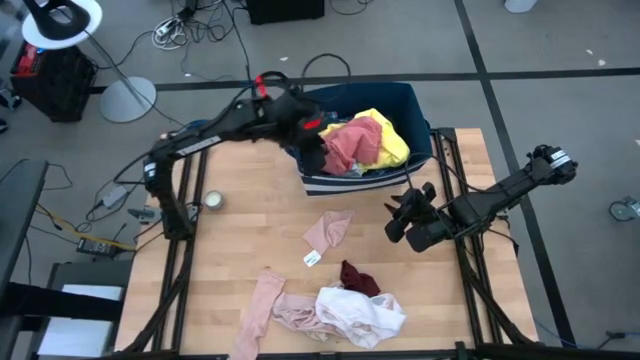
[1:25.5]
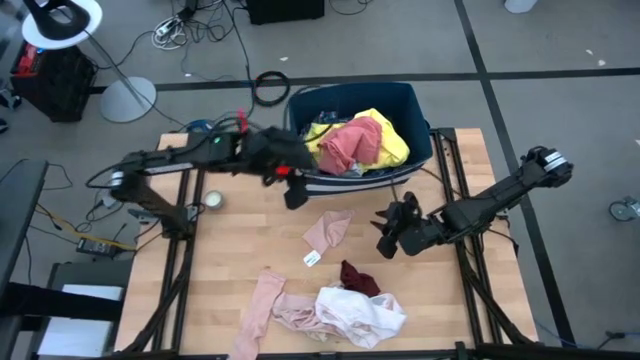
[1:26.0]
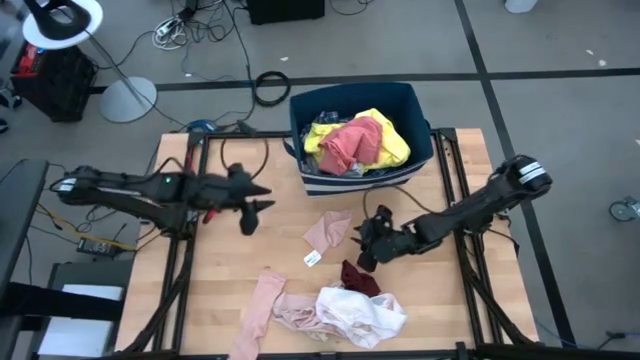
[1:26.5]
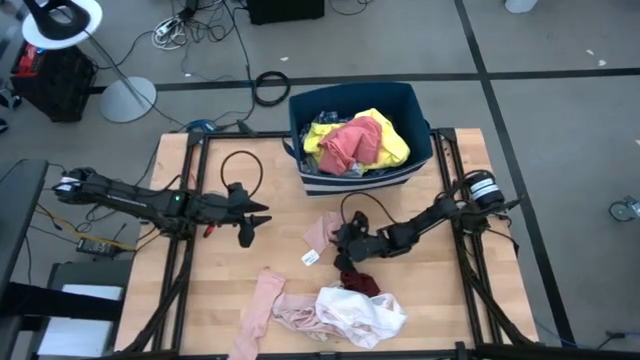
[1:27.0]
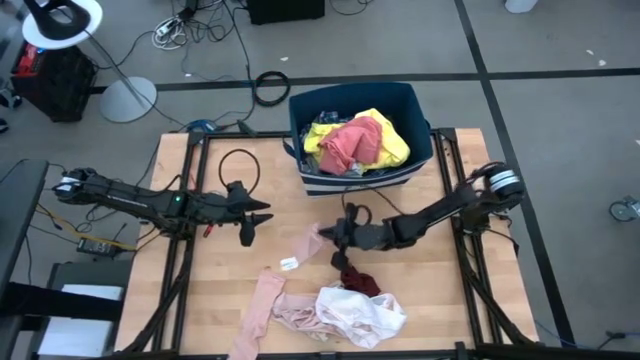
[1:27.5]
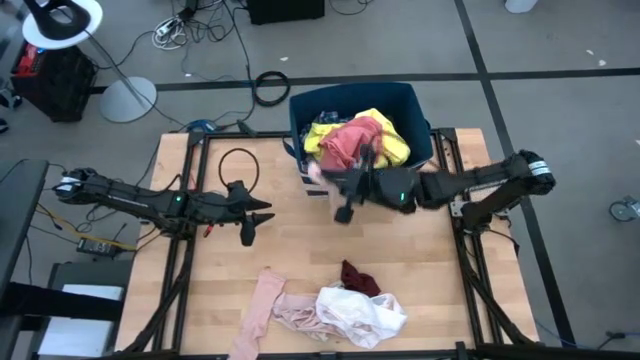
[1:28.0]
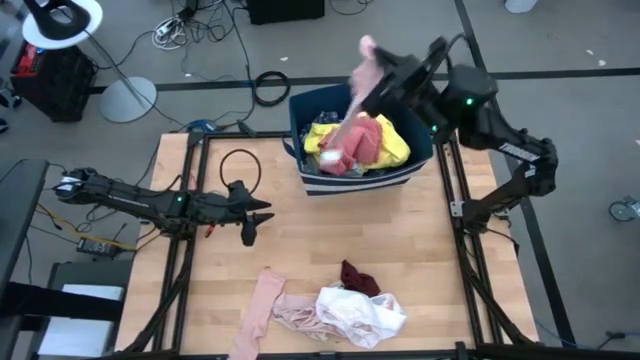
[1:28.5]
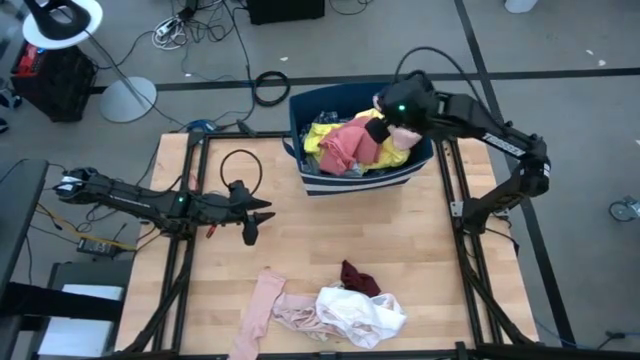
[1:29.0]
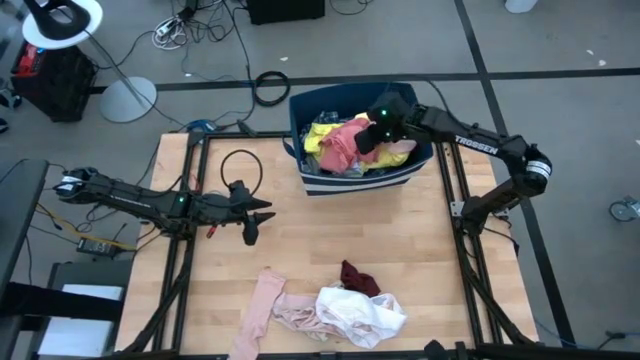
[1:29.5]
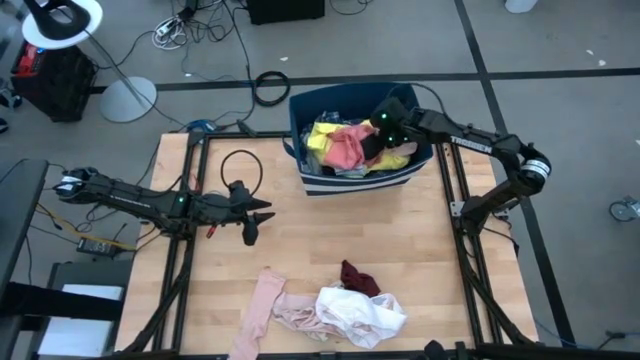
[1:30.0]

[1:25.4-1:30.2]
Task: Sort clothes
Put the top light pink sock into the blue laundry bin

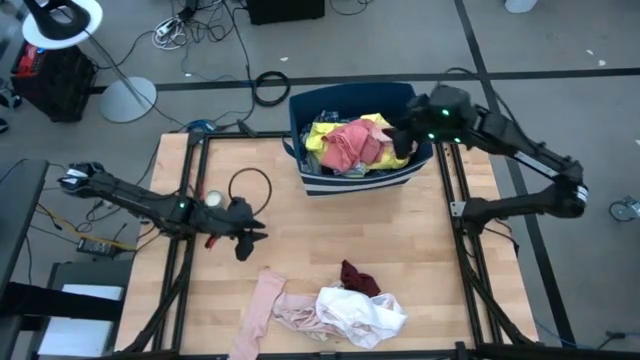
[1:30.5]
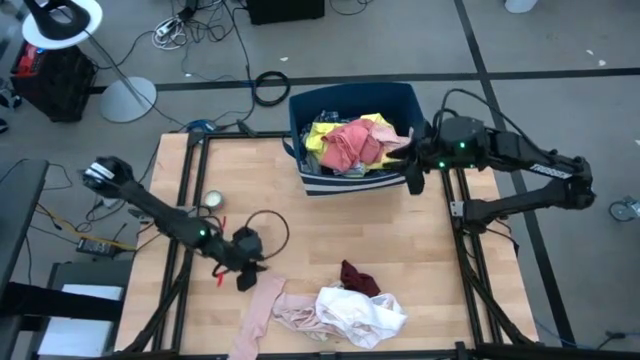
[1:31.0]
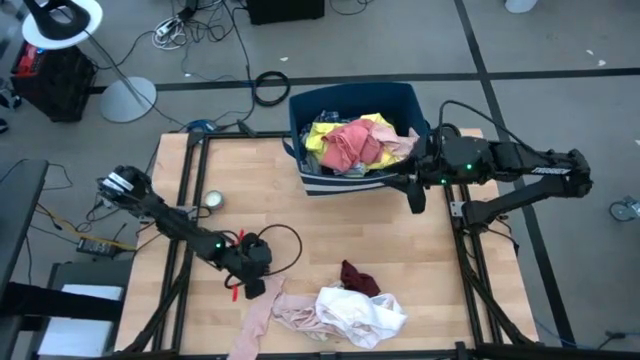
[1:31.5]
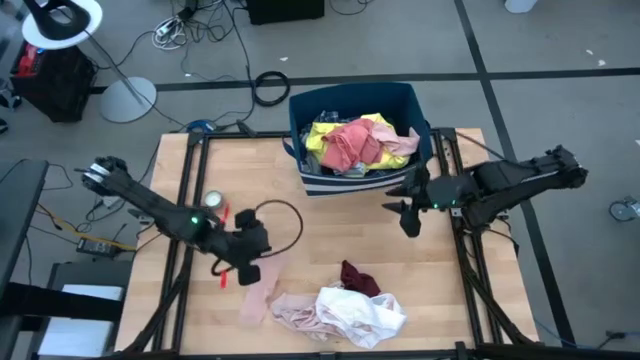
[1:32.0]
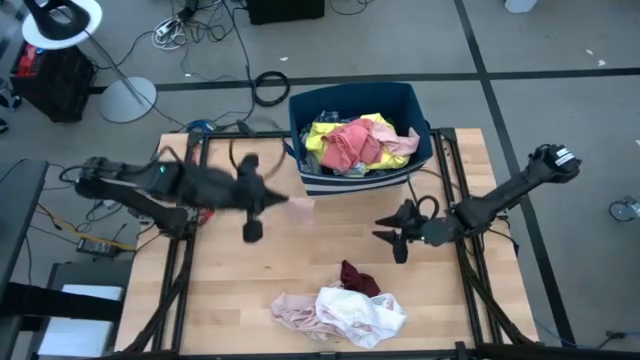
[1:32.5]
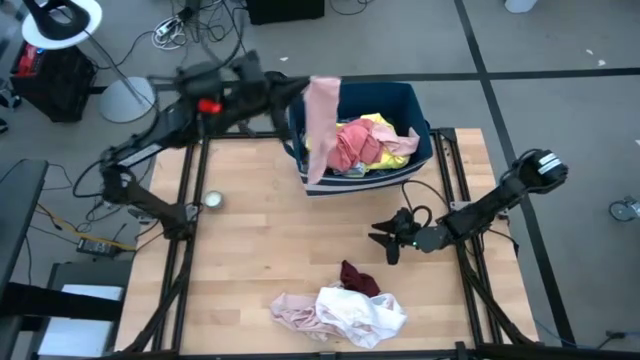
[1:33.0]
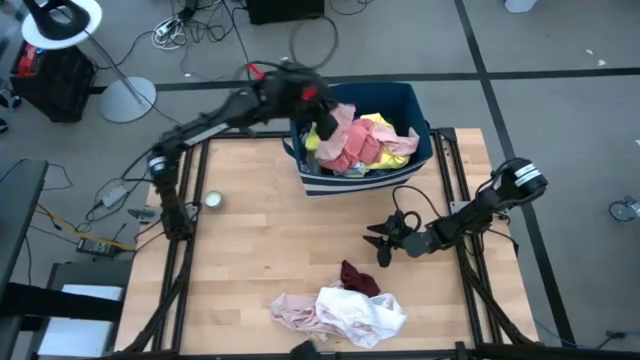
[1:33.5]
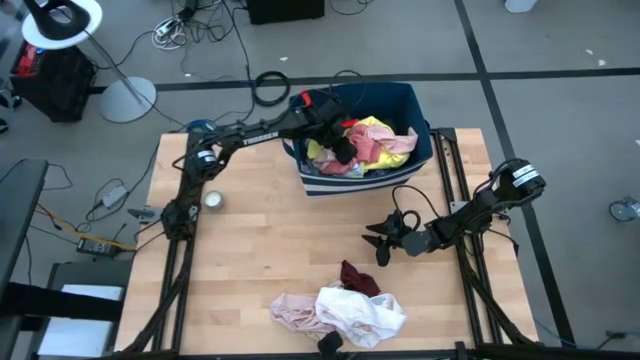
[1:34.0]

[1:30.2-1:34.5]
Put the light pink sock into the blue laundry bin

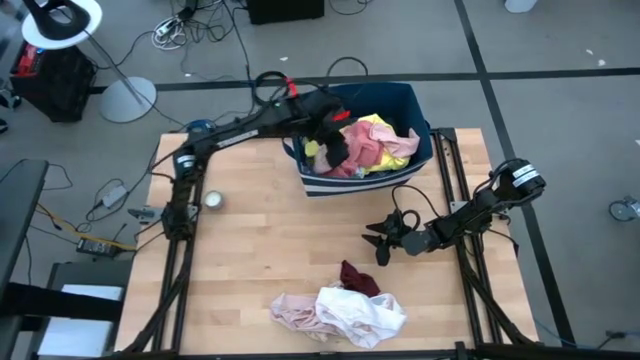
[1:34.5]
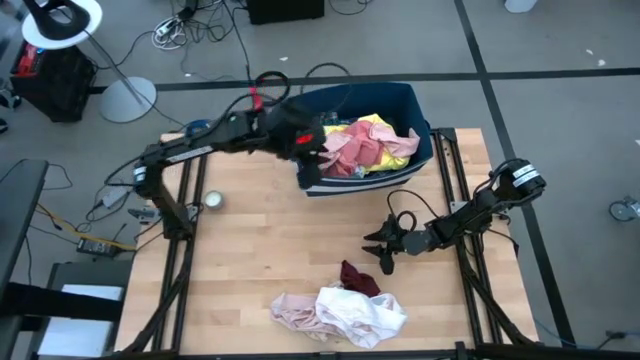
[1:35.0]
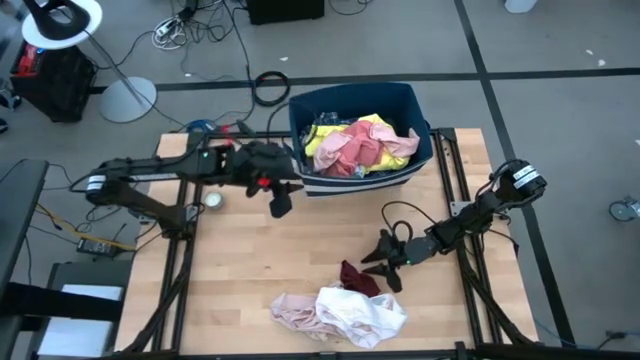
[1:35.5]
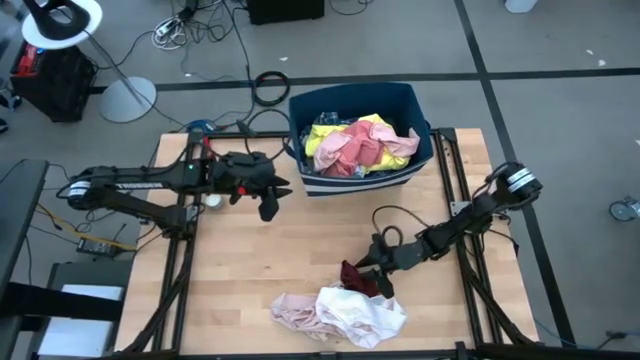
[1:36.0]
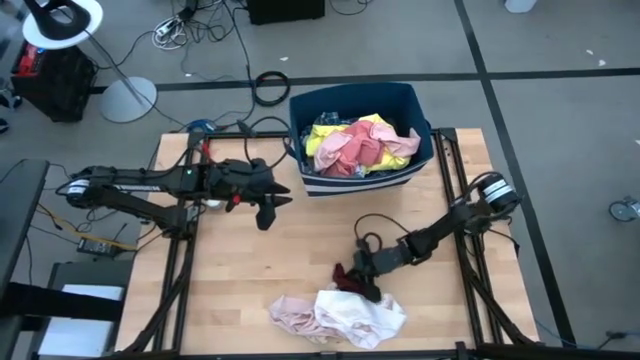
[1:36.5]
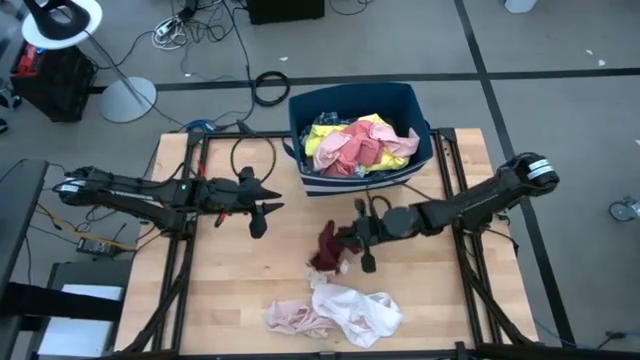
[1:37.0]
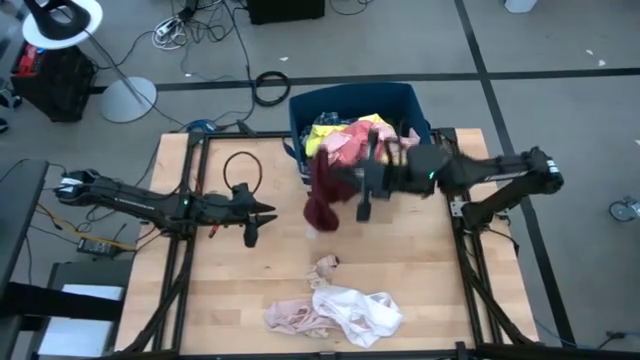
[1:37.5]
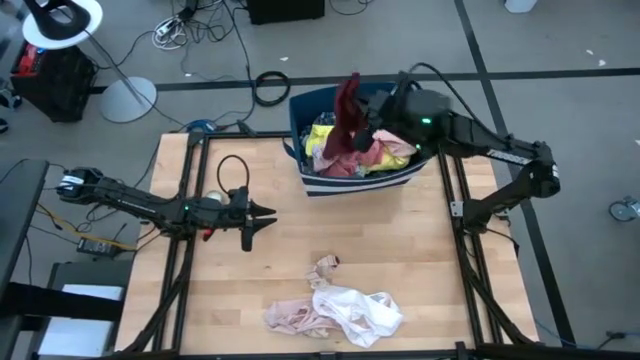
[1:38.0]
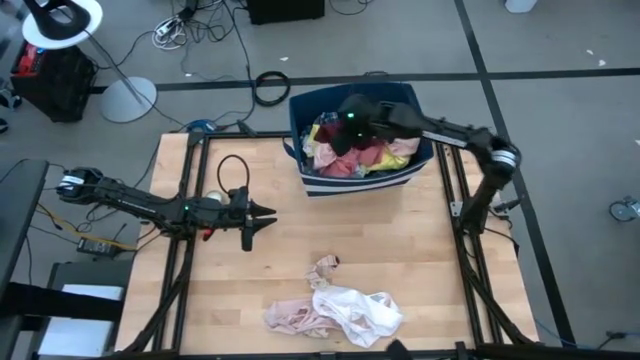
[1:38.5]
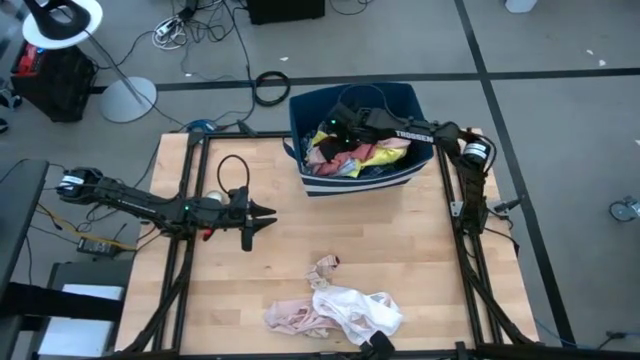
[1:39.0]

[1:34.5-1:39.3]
Put the red underwear into the blue laundry bin

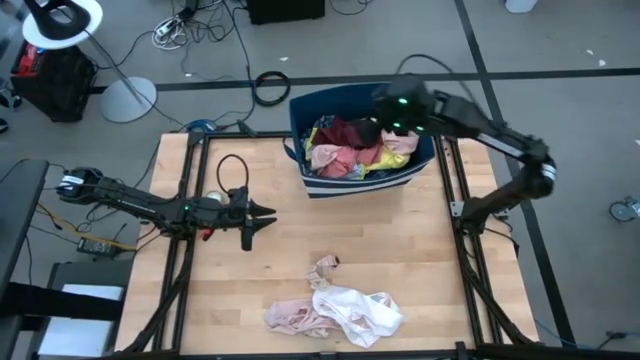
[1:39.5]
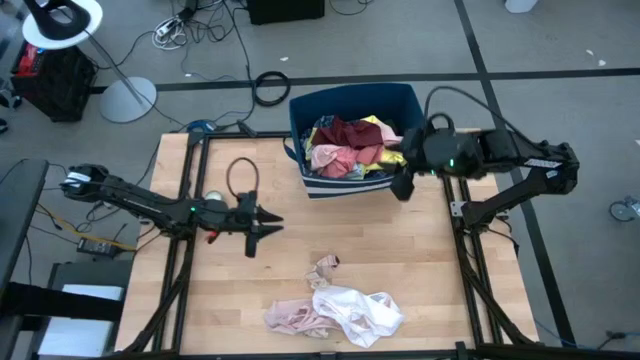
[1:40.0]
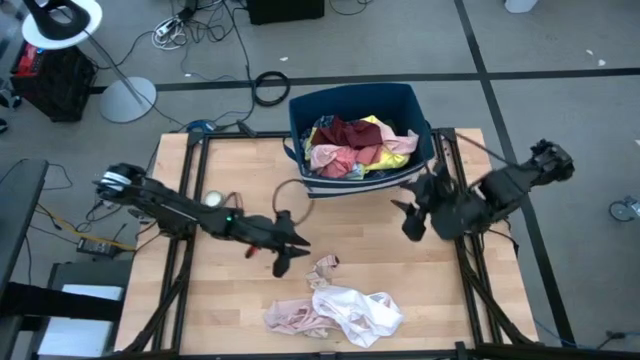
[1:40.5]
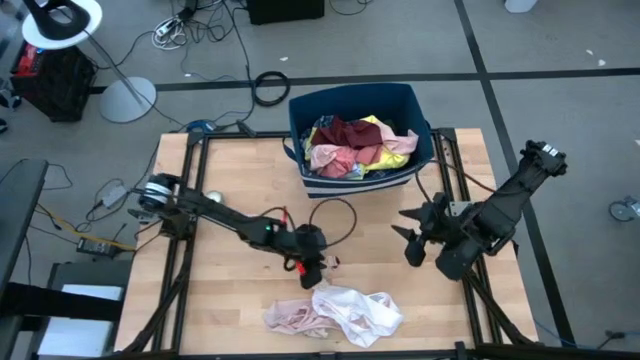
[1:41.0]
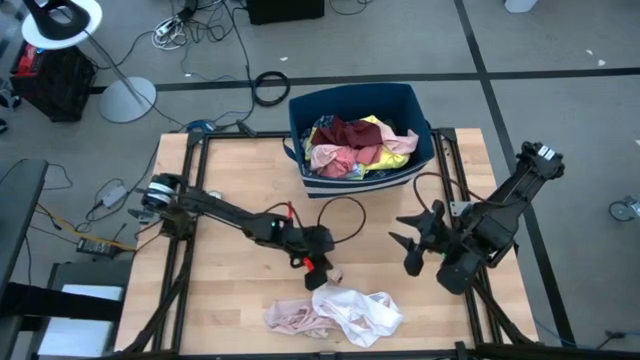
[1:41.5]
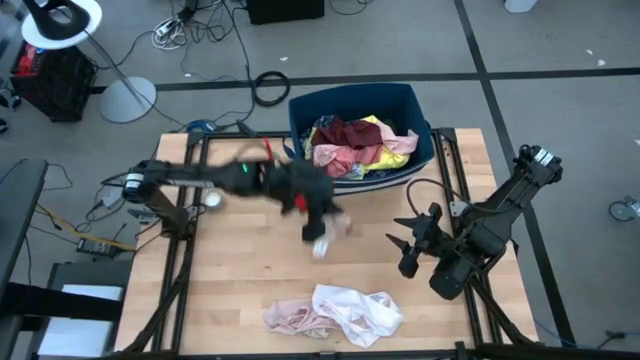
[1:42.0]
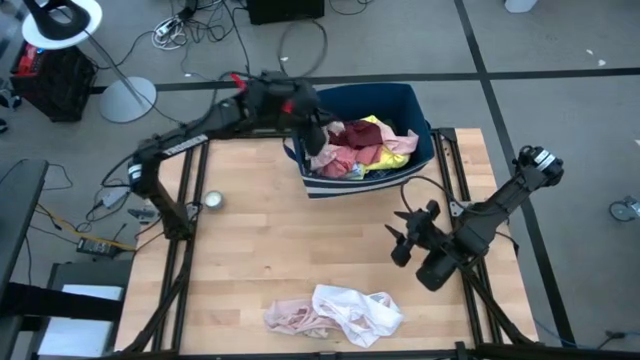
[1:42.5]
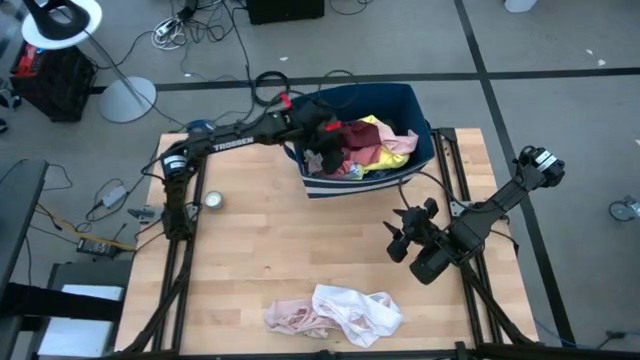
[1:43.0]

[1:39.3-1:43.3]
Put the top brown striped sock into the blue laundry bin
